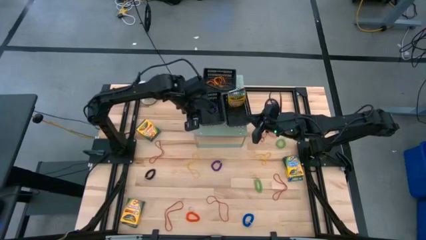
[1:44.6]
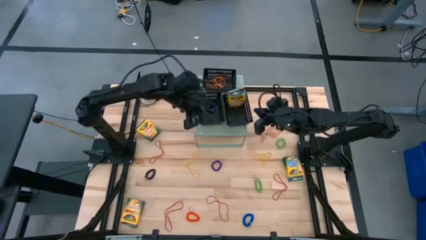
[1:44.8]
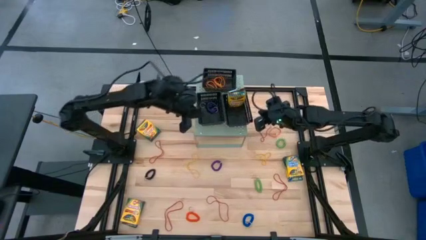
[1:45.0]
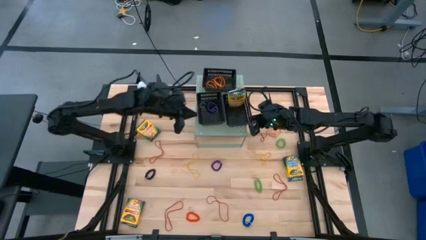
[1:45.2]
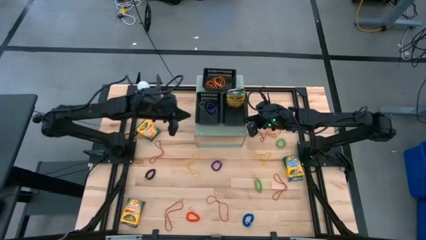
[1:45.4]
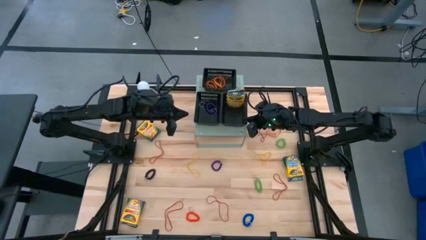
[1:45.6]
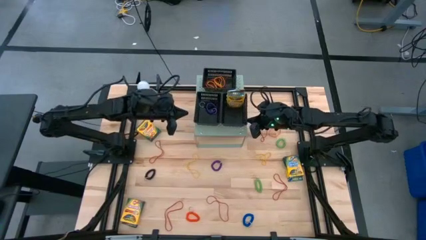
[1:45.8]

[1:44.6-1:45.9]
Task: Pick & Place Office Desk Supplies
Adjust the bottom right black bin

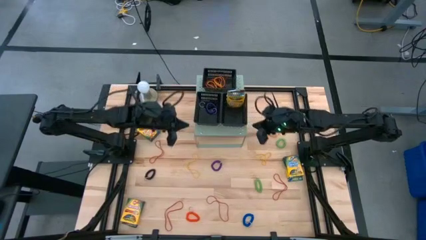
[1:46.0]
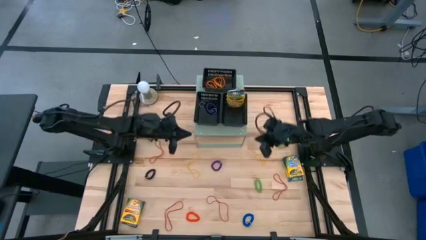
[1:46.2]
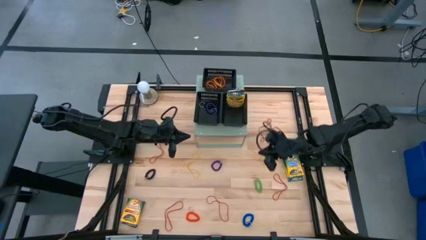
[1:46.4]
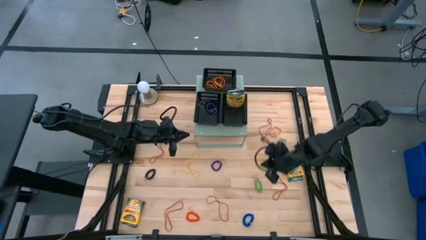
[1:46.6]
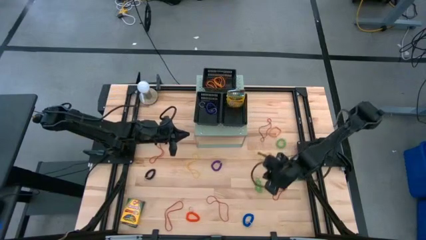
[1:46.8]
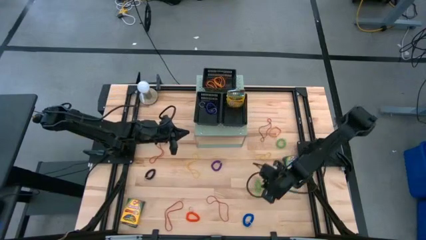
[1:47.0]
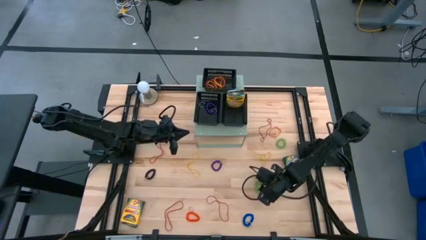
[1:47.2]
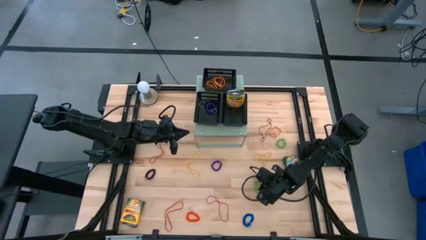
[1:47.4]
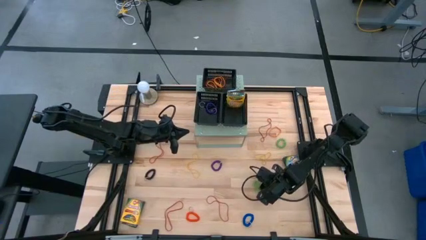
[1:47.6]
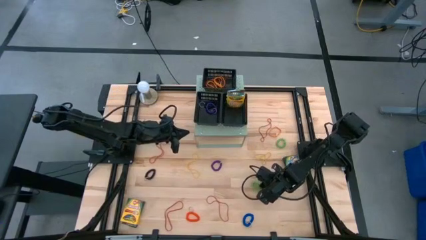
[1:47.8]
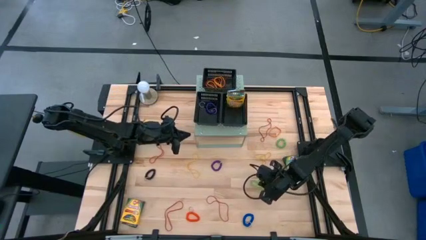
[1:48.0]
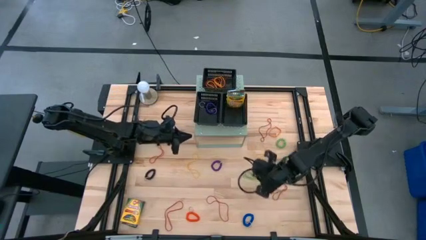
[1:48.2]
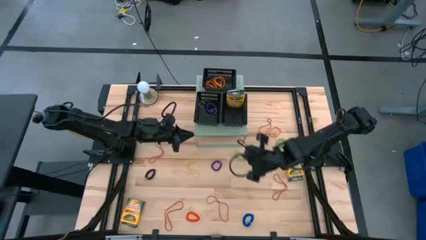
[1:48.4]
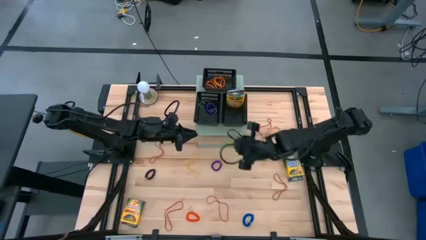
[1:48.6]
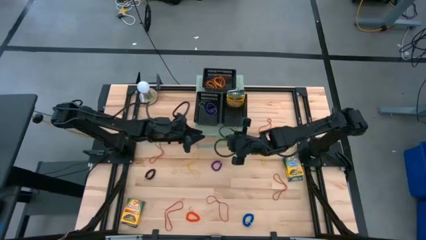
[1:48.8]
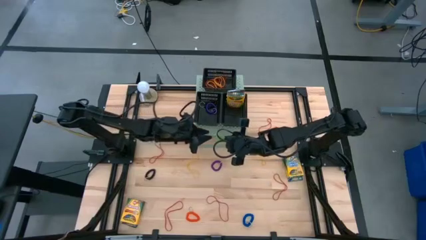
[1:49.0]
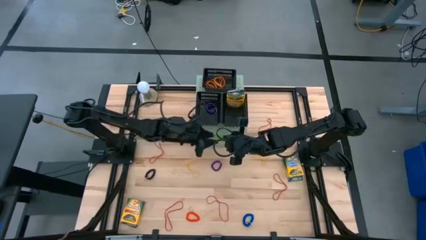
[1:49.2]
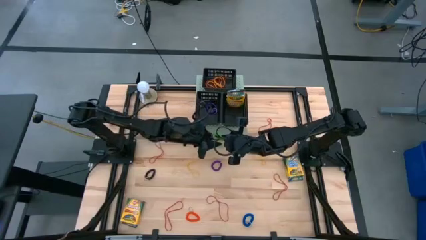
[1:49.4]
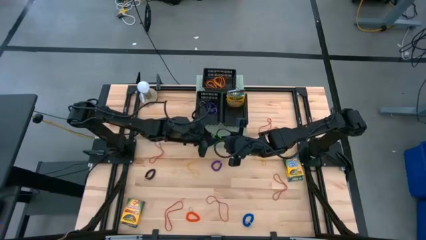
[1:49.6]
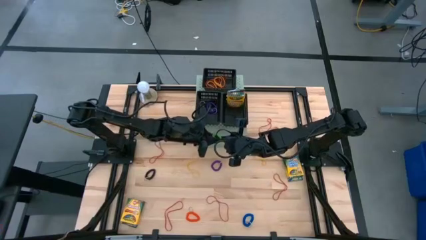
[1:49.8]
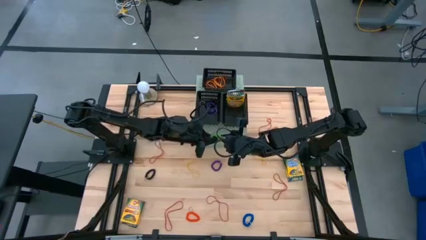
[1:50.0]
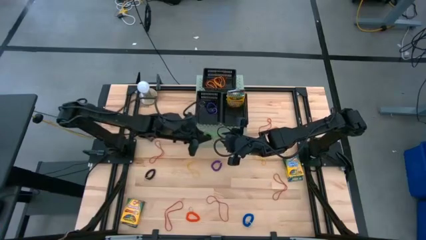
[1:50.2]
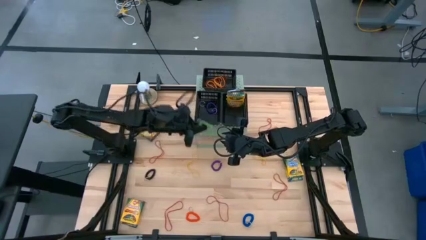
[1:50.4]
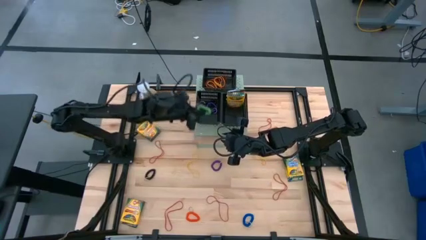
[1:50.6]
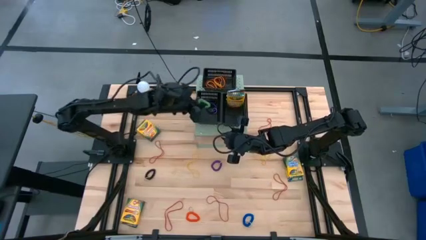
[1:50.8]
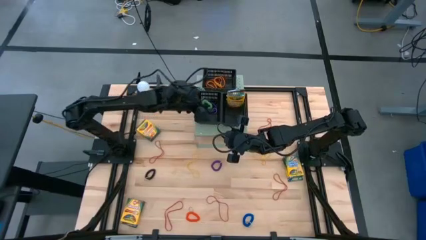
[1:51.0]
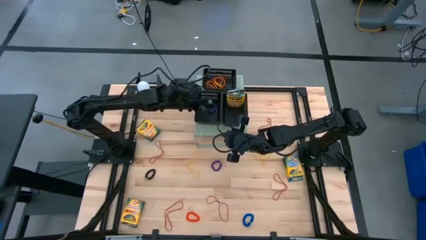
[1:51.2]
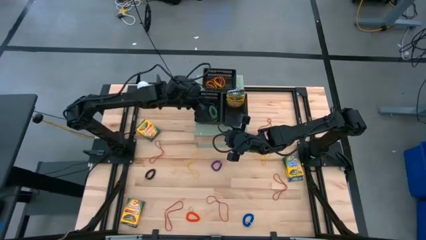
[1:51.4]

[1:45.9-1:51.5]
Put the green spiral keychain into the bottom left black bin

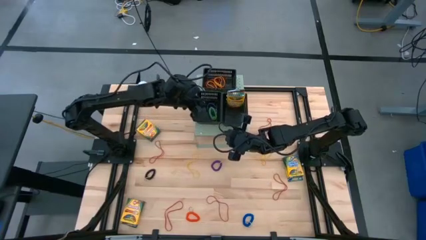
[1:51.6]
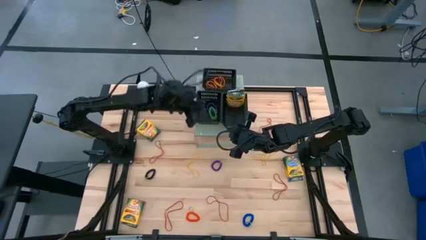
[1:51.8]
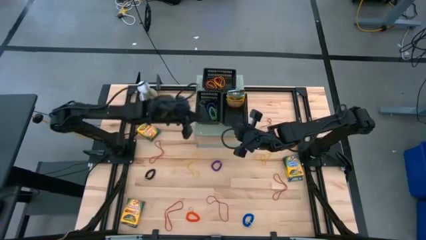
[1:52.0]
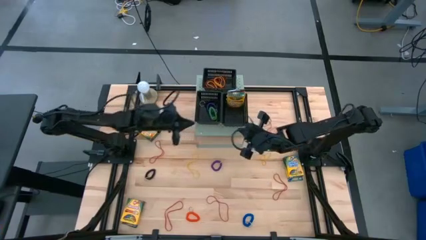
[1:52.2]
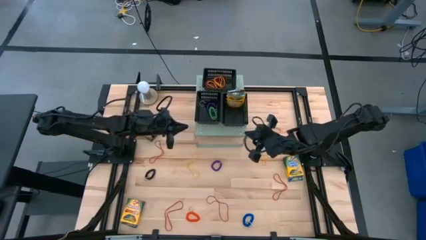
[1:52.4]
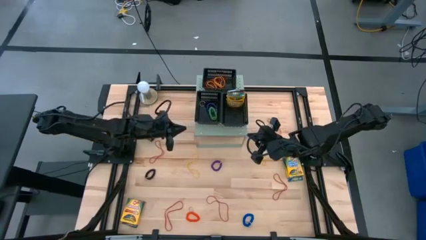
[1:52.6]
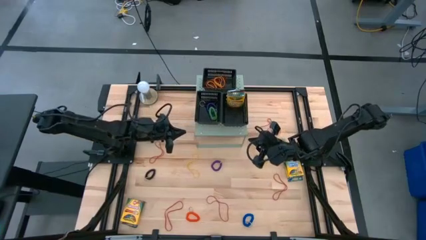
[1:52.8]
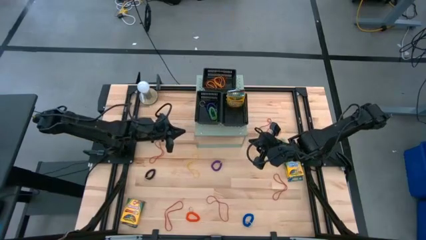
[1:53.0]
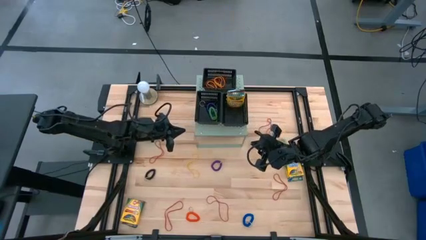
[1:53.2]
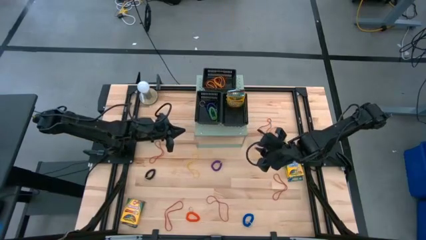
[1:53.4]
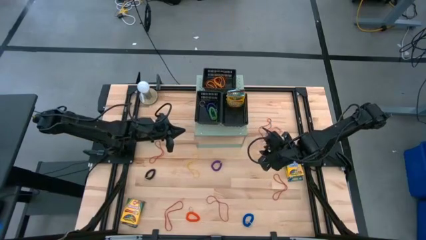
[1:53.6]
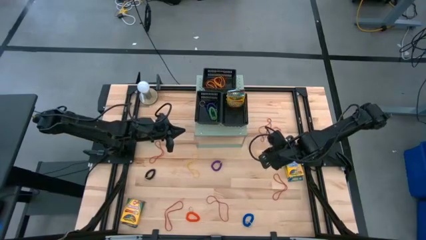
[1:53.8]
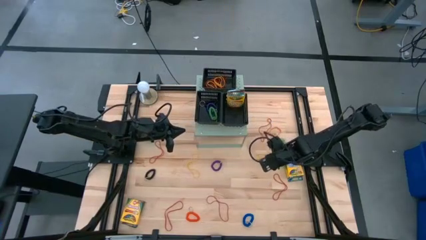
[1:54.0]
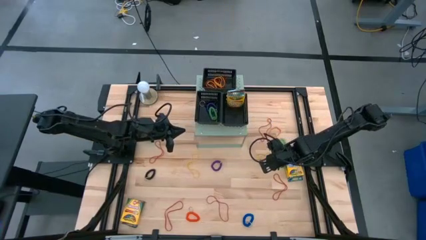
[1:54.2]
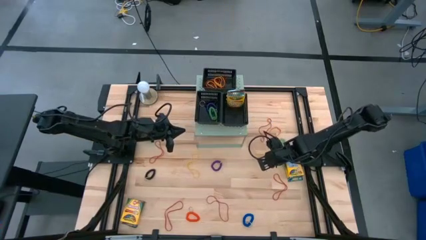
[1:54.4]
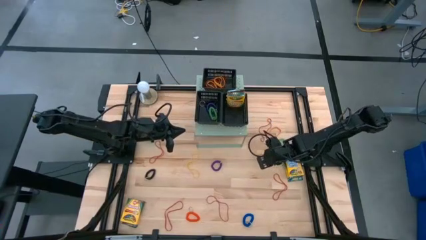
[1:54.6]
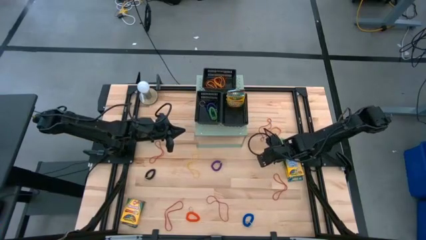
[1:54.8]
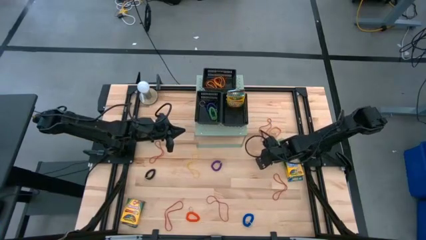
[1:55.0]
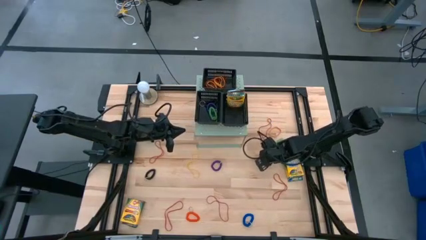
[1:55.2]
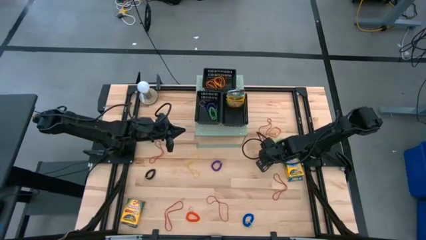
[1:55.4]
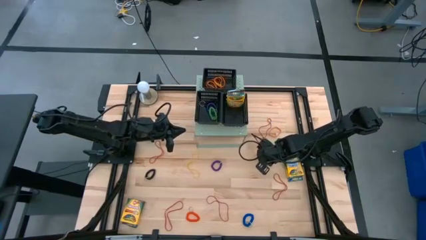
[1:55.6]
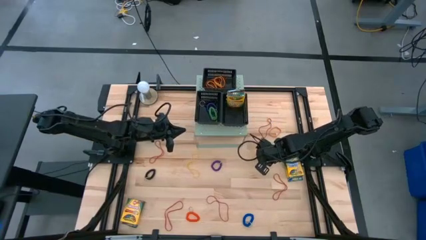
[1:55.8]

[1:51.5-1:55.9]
Put the yellow rubber band into the top black bin

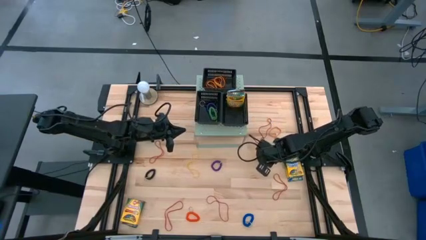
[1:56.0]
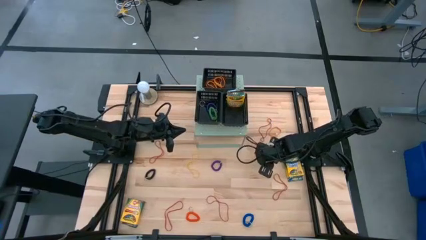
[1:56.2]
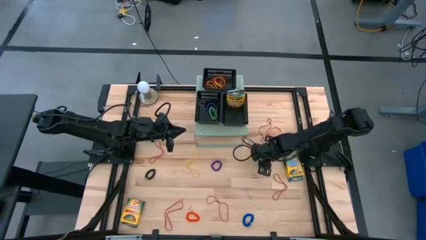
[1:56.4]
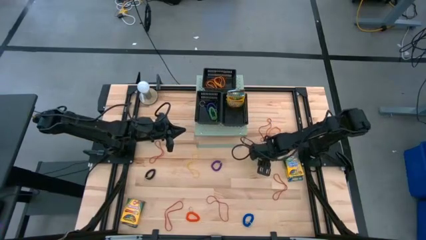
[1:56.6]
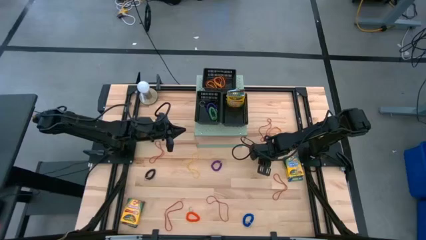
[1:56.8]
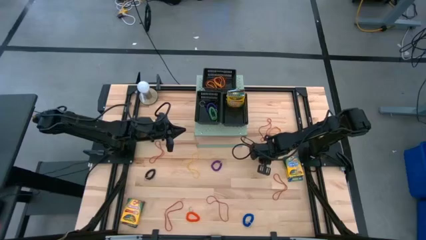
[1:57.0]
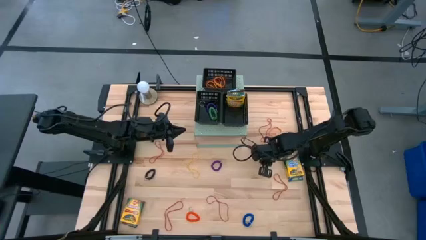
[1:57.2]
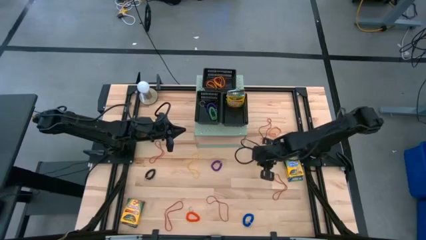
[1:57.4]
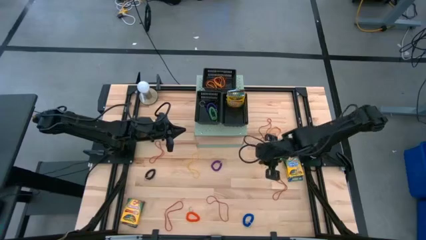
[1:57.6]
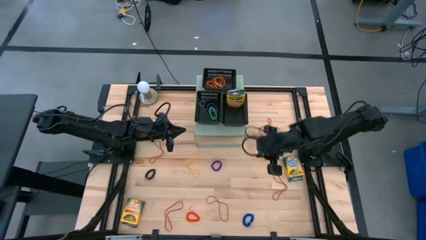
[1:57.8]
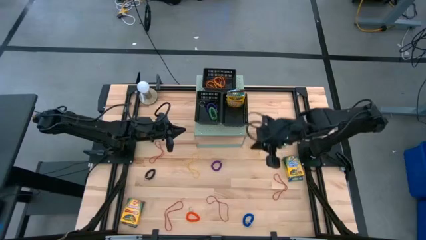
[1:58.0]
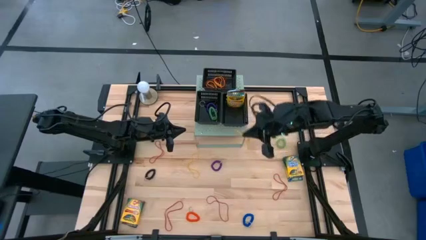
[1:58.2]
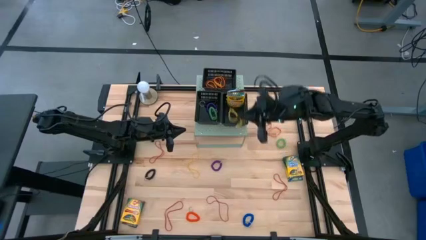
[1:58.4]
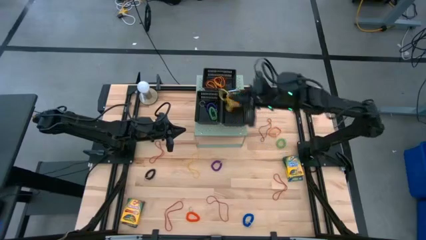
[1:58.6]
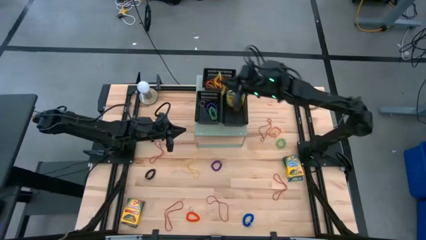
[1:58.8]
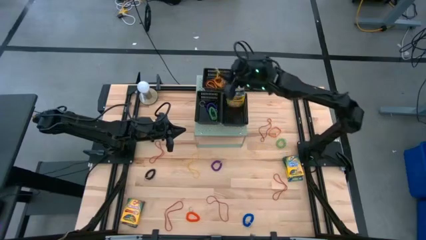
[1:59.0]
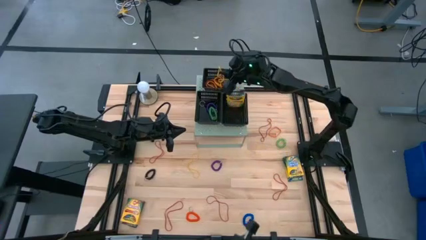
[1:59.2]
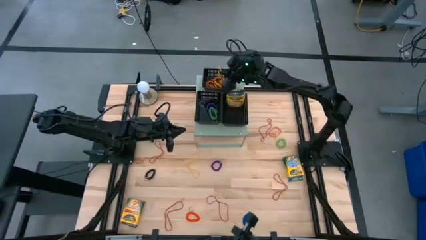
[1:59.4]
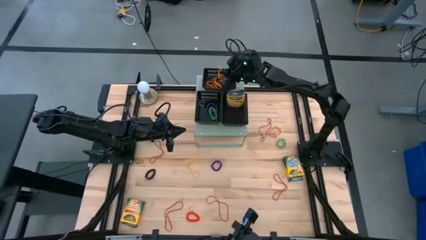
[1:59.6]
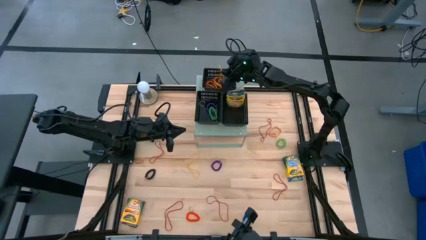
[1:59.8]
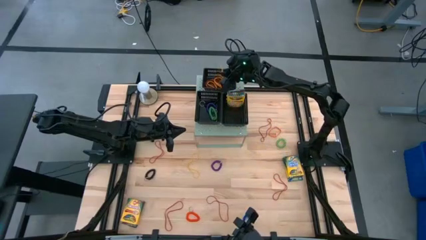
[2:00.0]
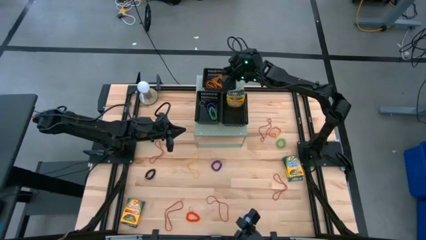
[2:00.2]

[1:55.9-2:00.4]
Put the yellow rubber band into the top black bin

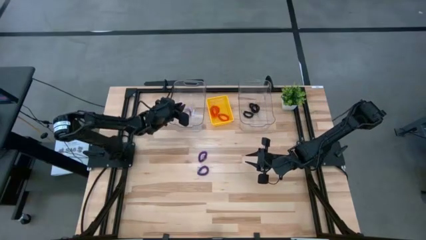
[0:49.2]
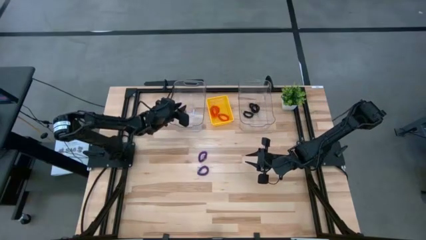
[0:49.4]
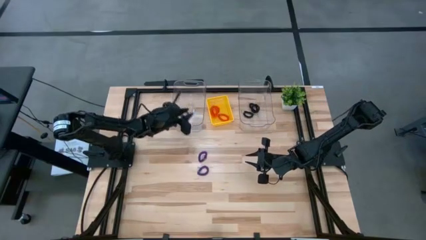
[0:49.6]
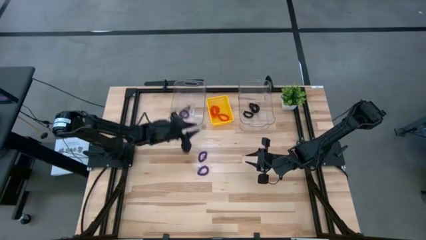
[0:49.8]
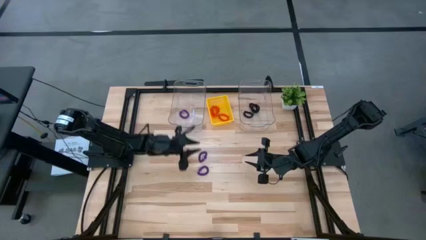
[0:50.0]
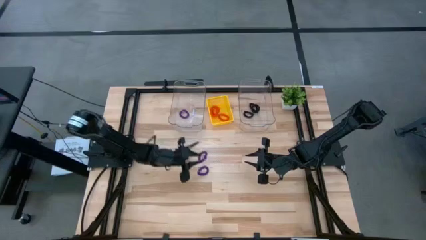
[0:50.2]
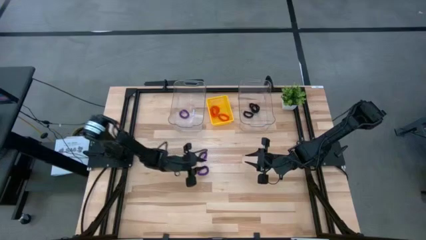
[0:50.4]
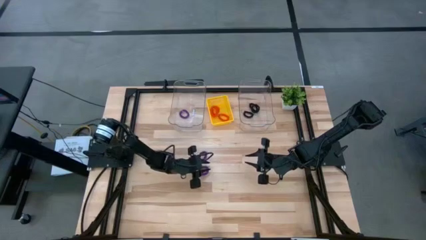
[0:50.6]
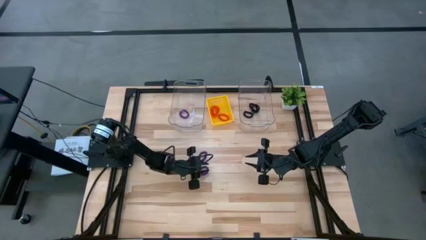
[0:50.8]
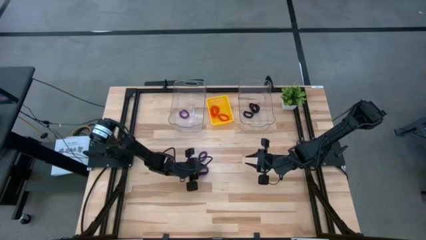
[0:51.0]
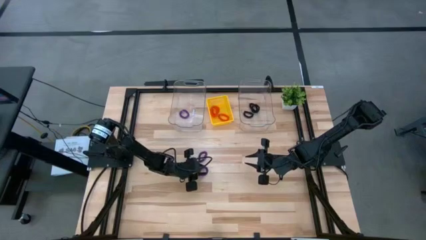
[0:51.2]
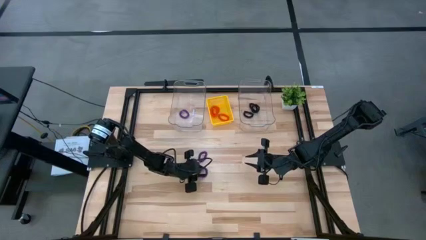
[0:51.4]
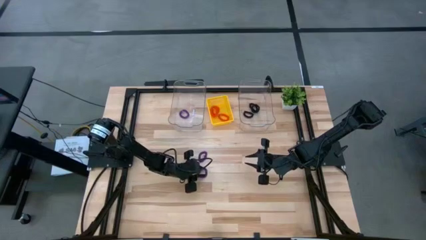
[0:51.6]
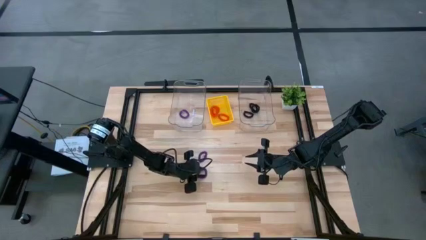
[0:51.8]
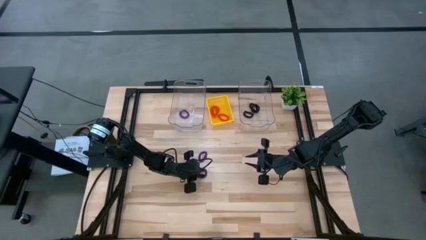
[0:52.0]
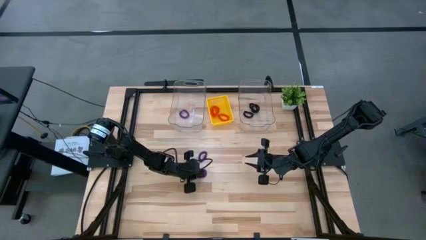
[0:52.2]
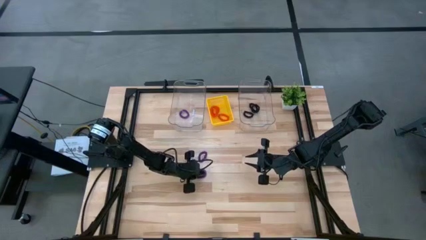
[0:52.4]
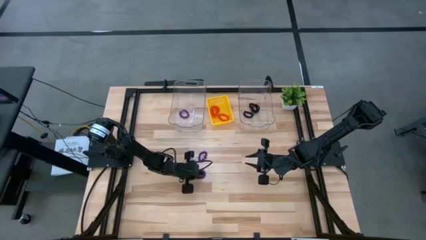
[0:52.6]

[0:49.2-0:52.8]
Task: Sort spring keychains
Put the bottom purple spring keychain into the left transparent bin
